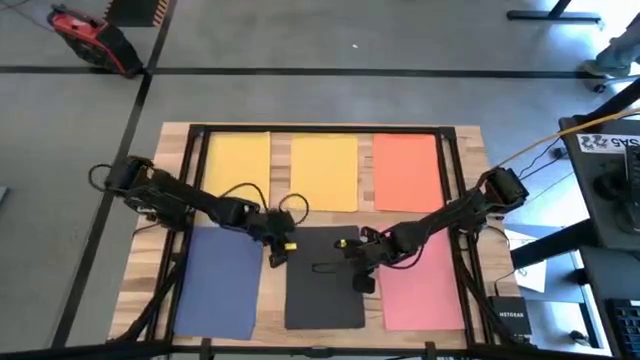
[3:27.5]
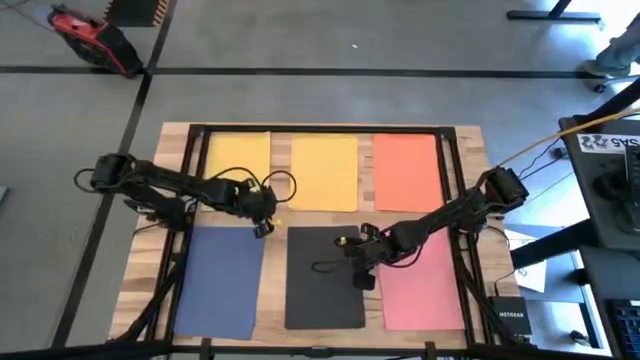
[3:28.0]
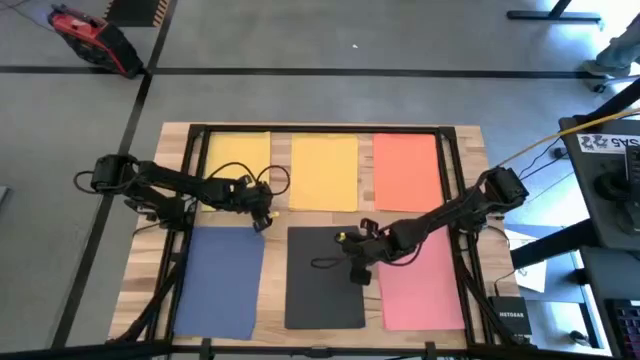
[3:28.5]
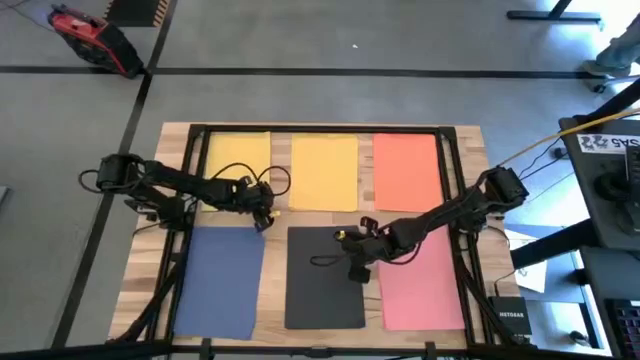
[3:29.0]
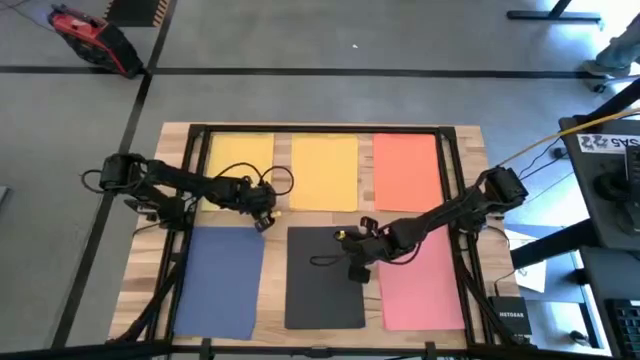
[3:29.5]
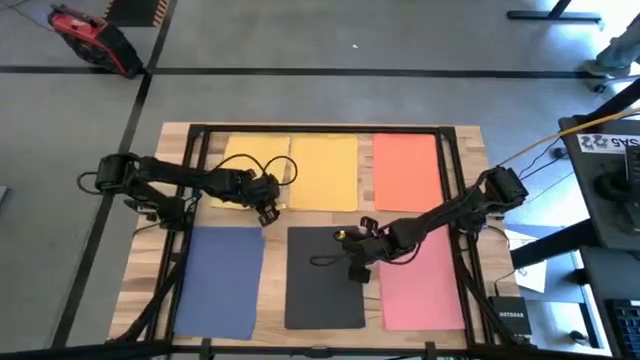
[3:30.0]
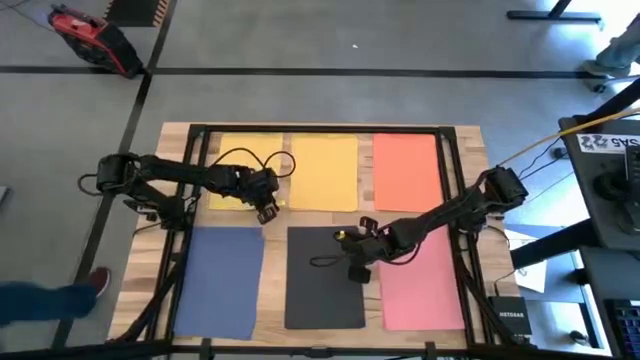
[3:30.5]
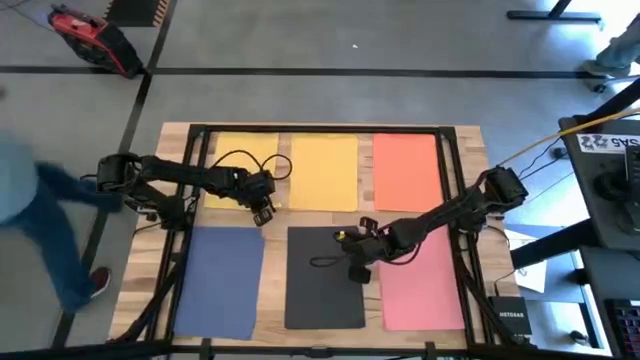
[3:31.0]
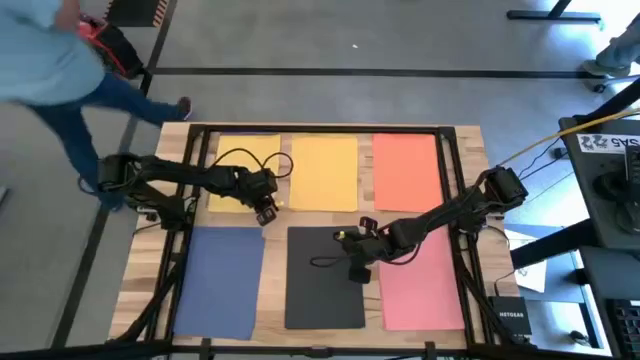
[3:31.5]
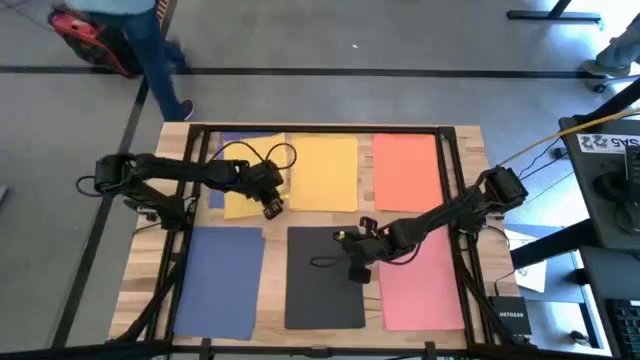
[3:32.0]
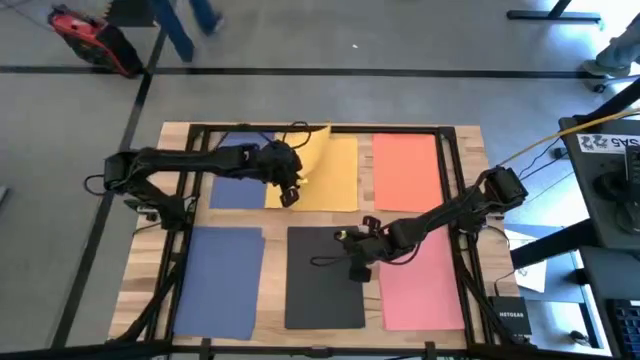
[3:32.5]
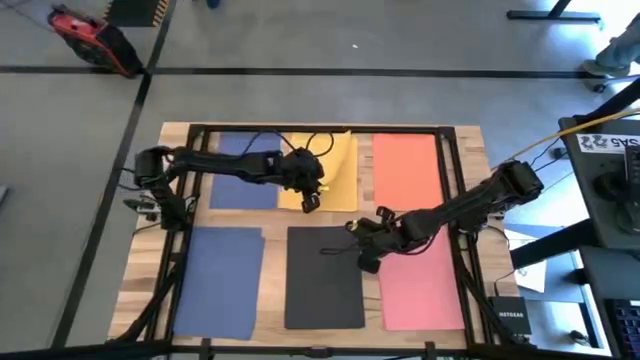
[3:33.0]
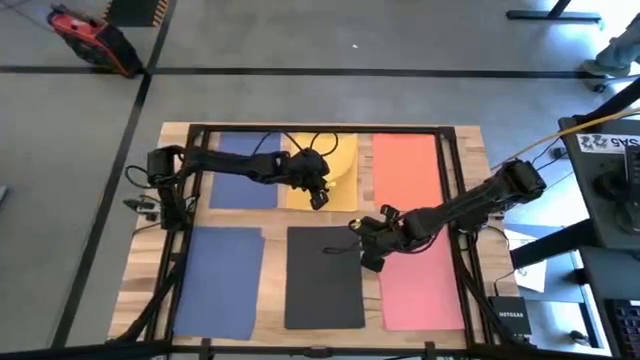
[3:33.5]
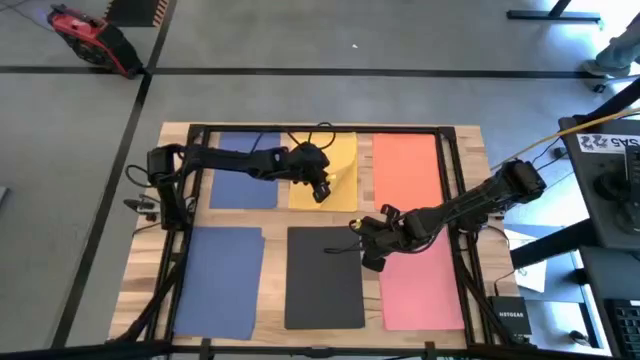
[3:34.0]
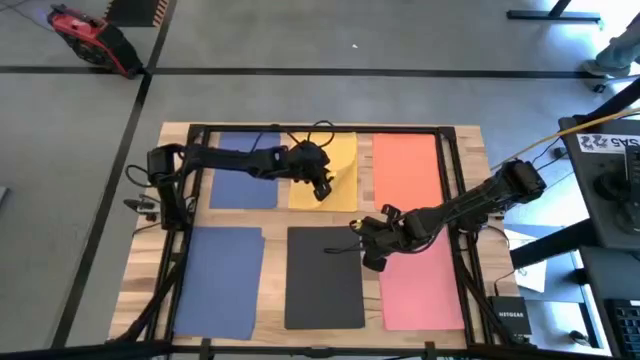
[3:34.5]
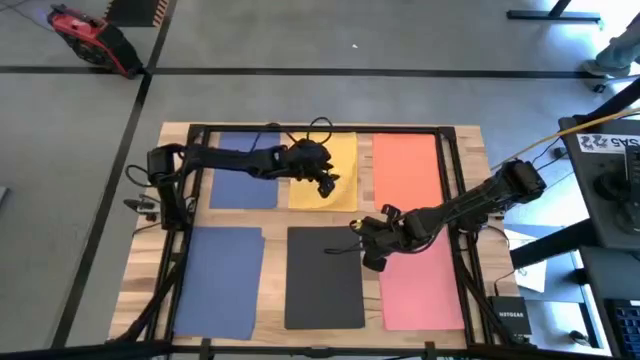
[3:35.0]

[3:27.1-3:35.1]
Task: Organize paper
Stack the yellow colored paper on top of the yellow colored papers

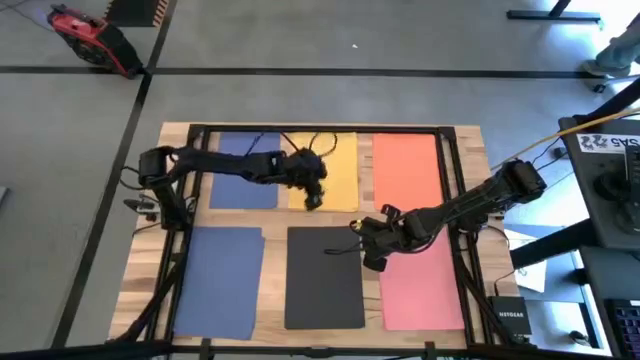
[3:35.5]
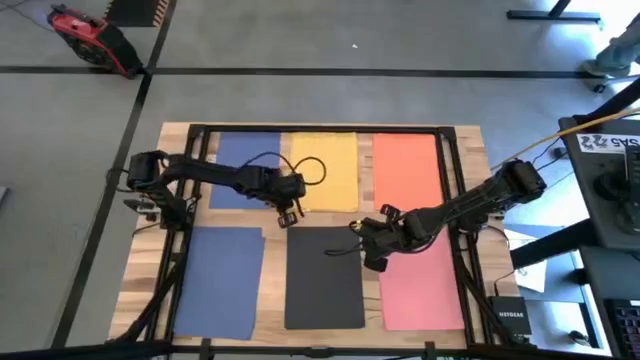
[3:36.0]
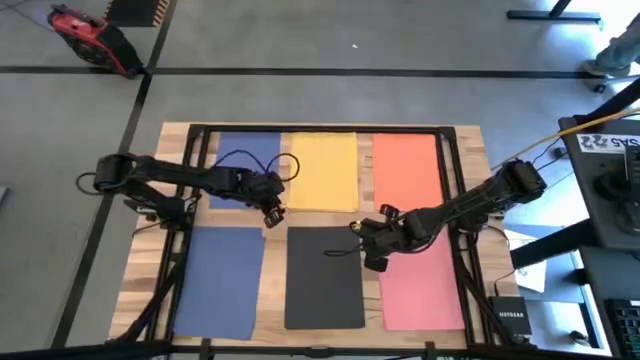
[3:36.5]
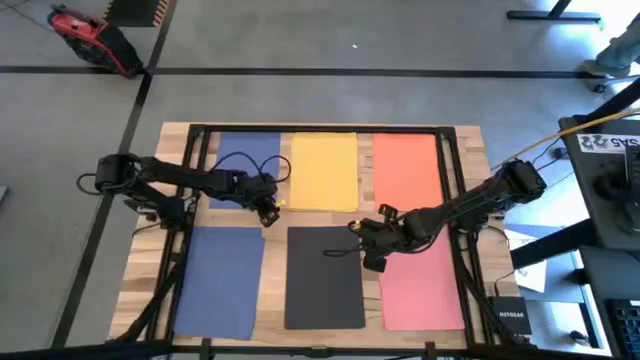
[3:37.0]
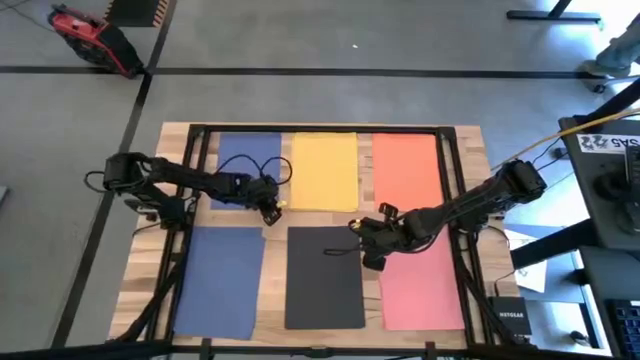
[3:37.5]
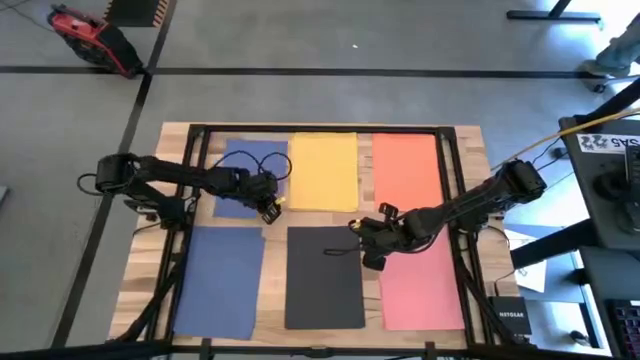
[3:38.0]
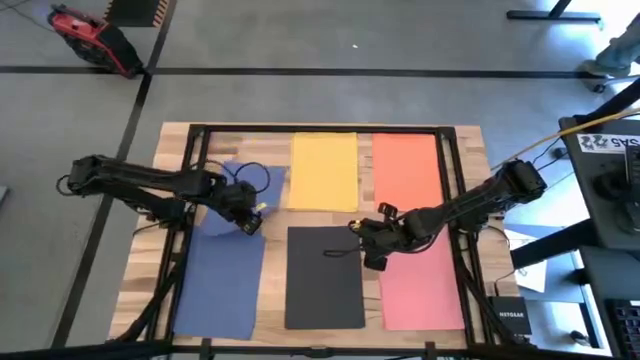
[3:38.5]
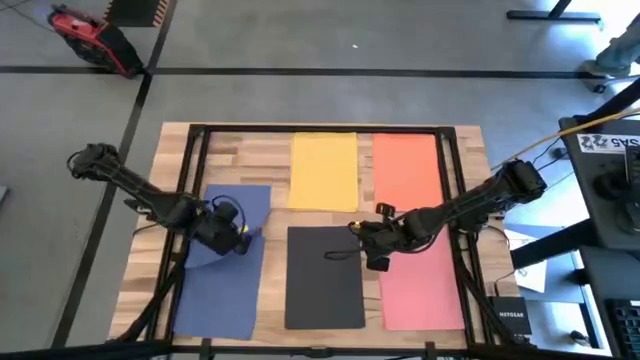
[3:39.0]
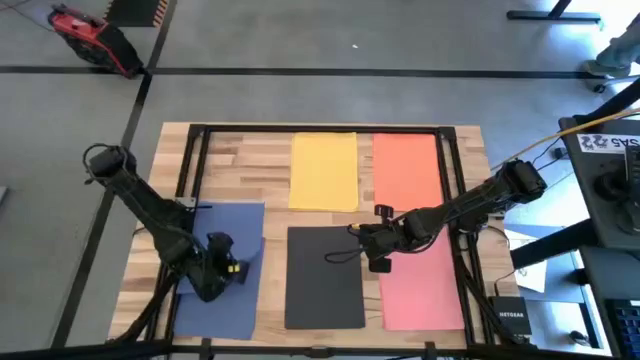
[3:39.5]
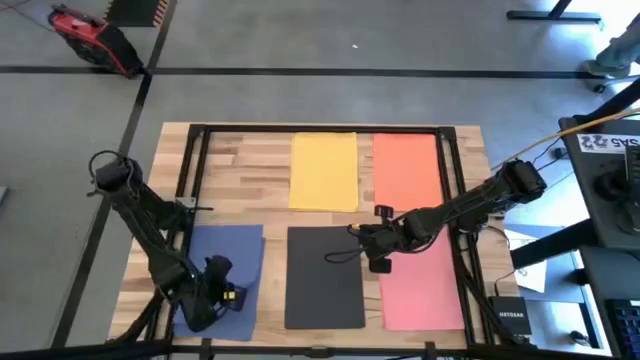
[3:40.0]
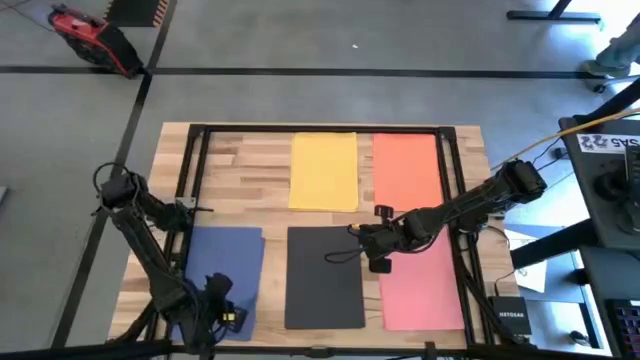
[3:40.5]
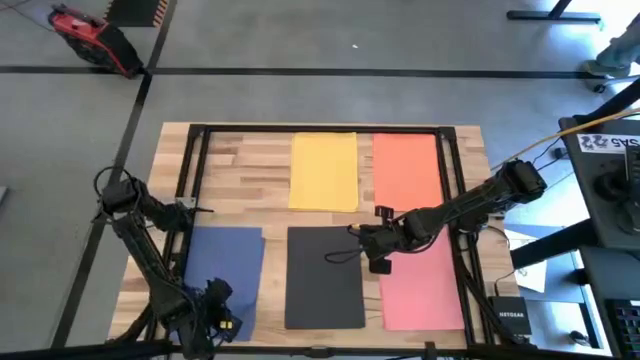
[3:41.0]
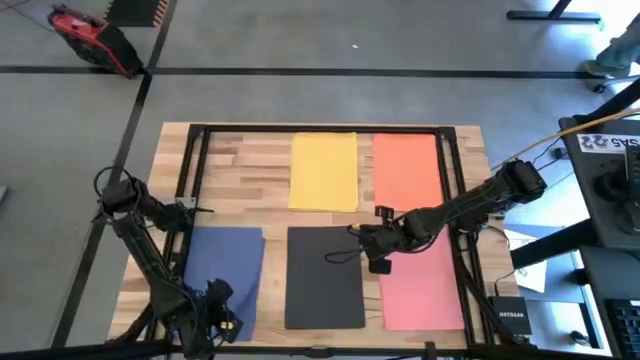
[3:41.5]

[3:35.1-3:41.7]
Stack the blue colored paper on top of the blue colored papers

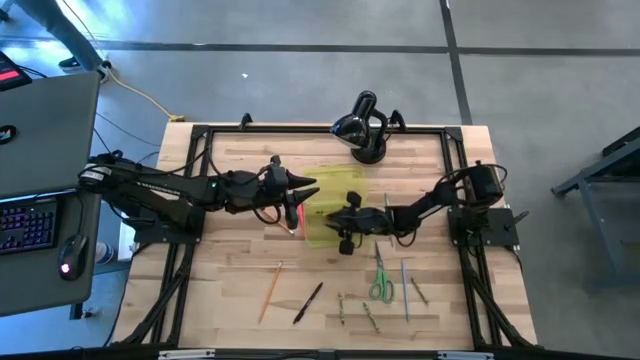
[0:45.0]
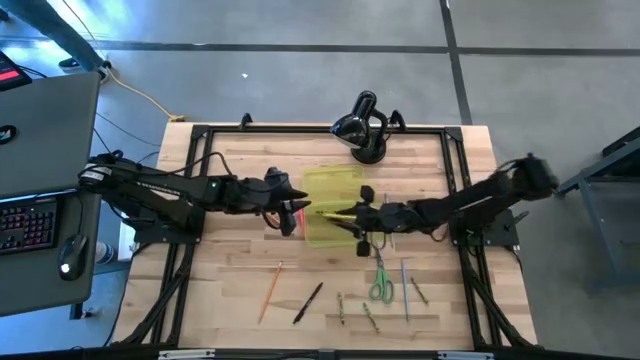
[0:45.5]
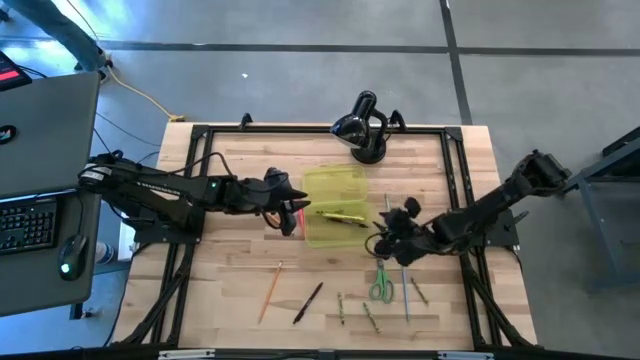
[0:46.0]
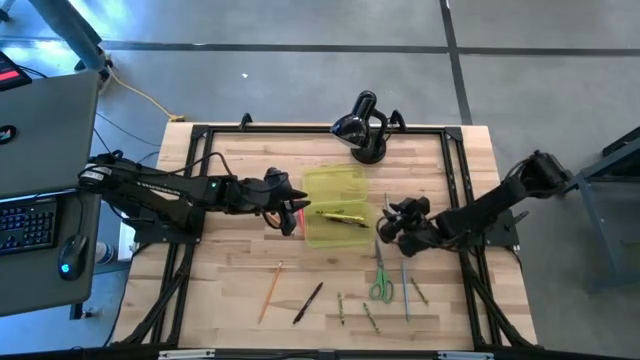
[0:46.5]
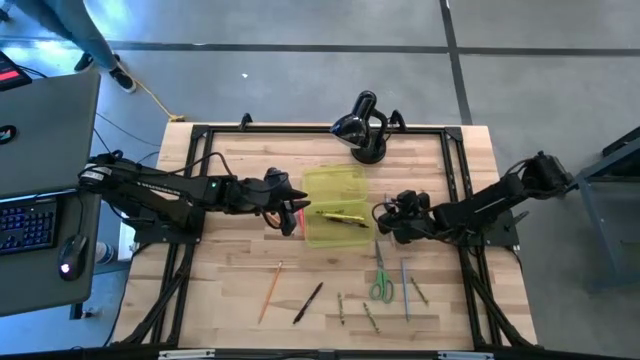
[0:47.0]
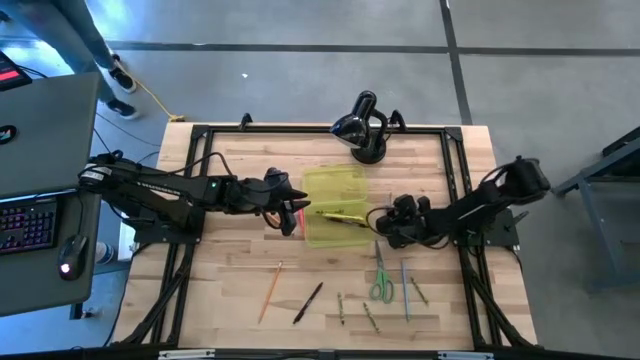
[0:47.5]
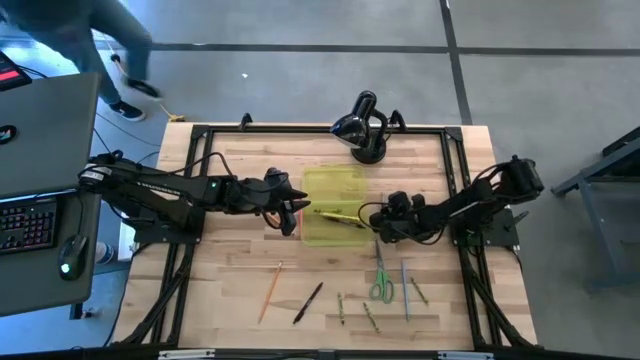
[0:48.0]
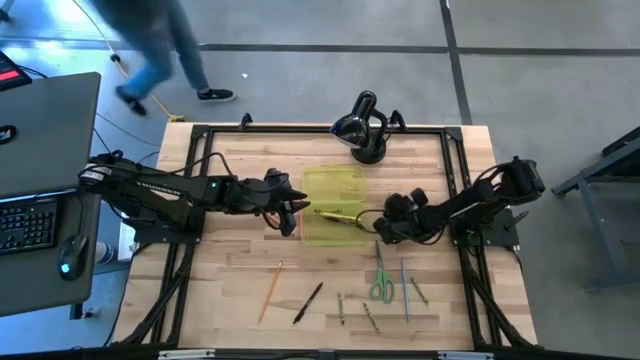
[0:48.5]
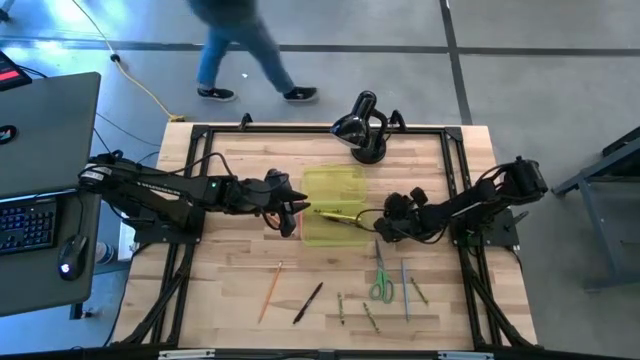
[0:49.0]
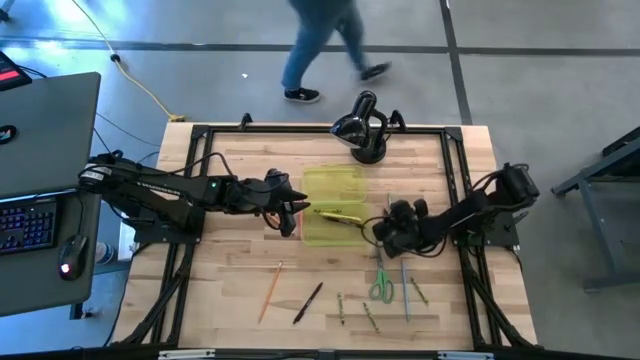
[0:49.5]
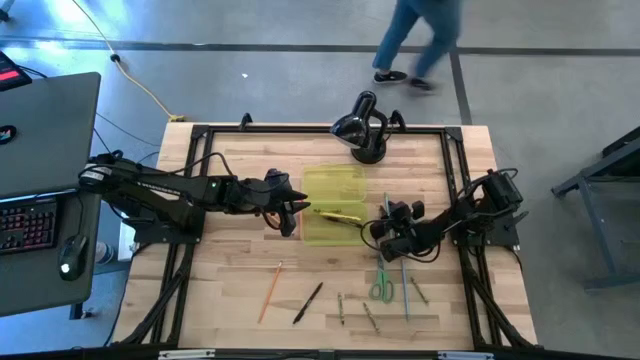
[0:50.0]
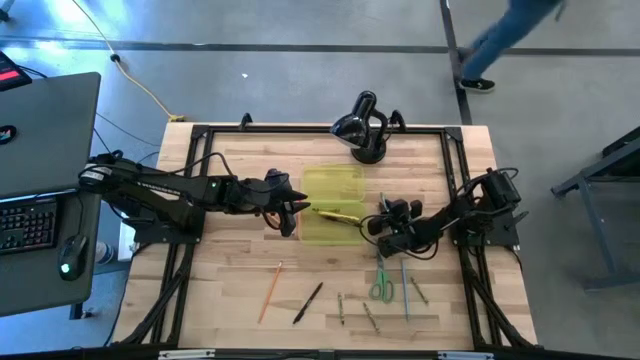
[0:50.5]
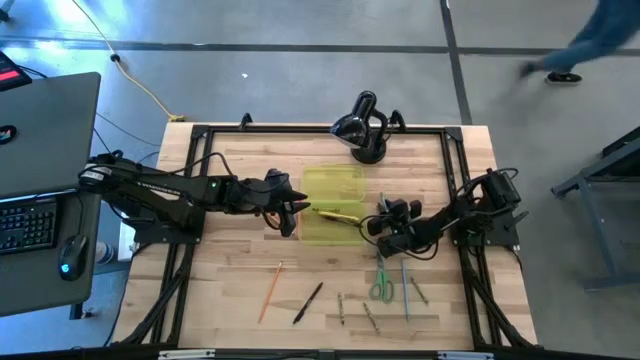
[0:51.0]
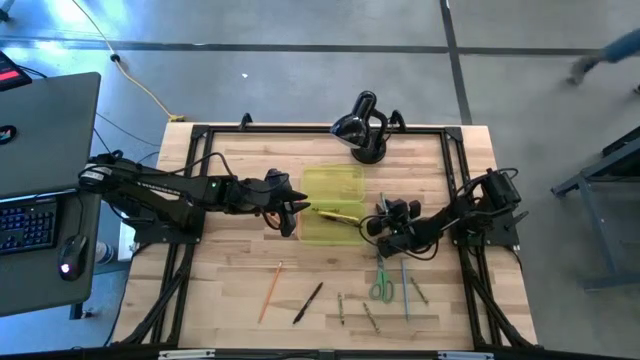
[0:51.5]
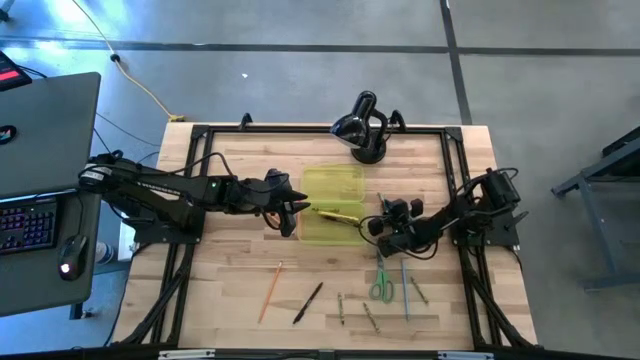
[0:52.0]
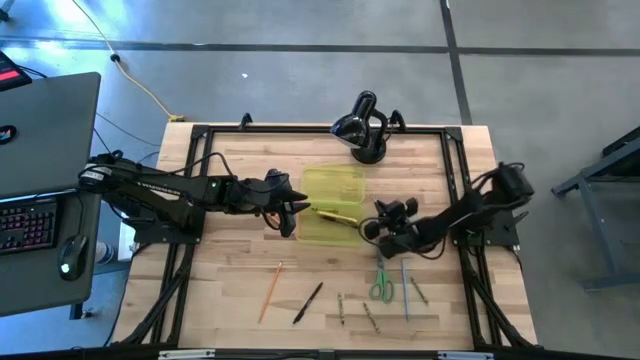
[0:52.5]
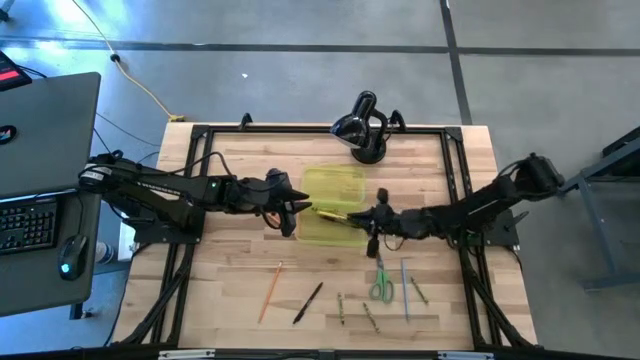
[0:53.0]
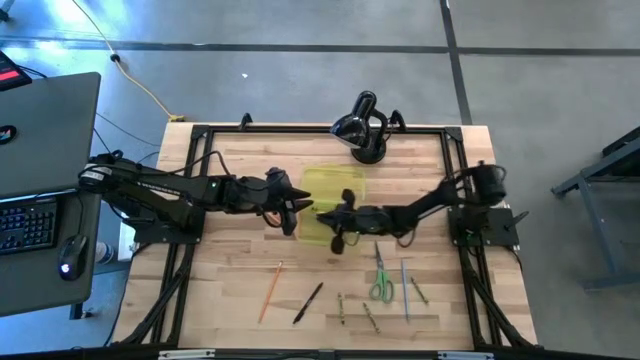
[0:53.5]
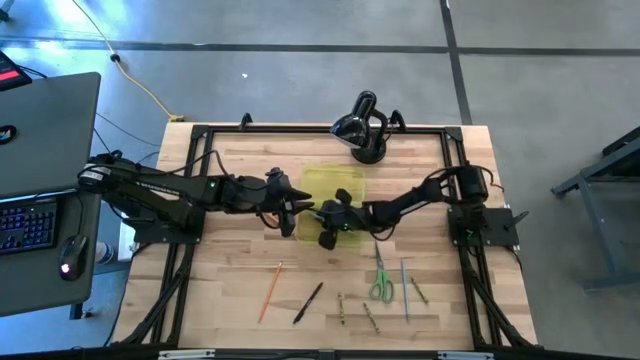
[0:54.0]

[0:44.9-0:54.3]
Task: Pick & place school supplies into a supply box
Put the light blue pencil into the yellow school supply box
